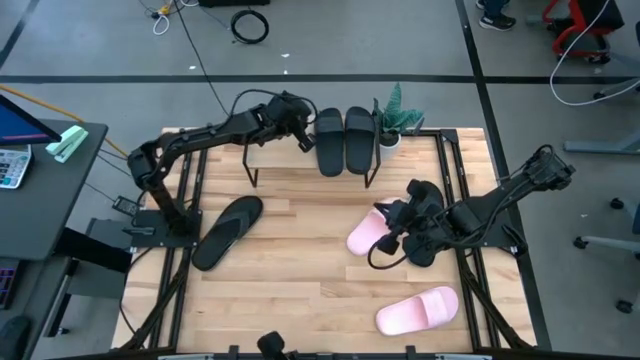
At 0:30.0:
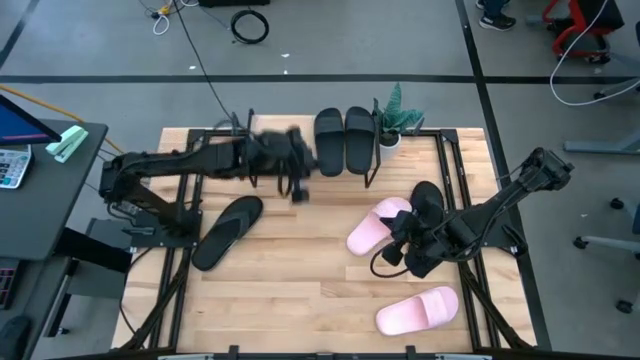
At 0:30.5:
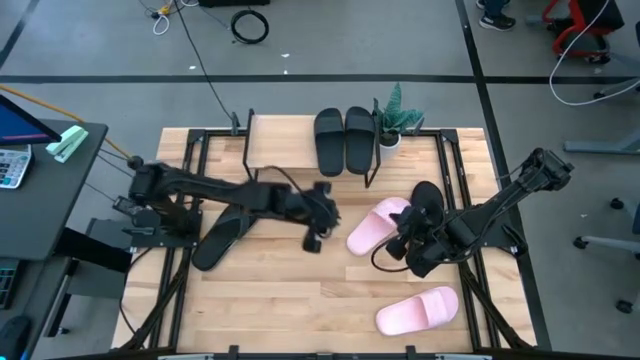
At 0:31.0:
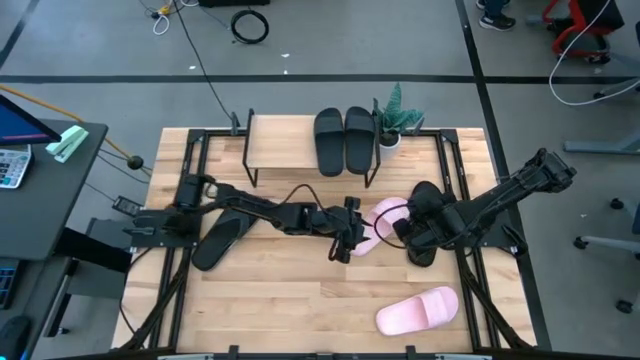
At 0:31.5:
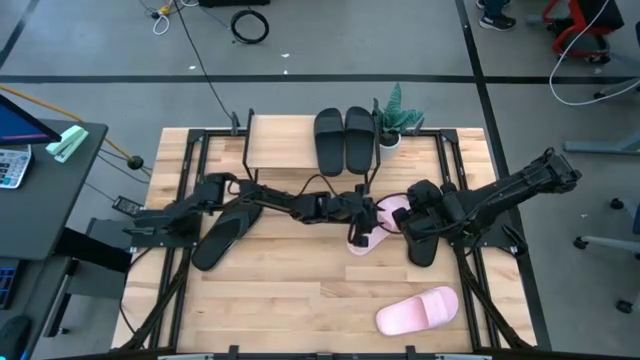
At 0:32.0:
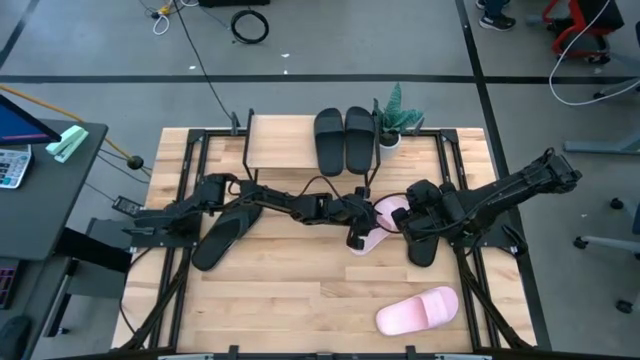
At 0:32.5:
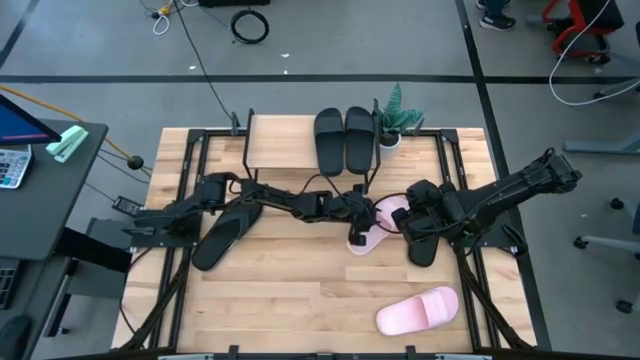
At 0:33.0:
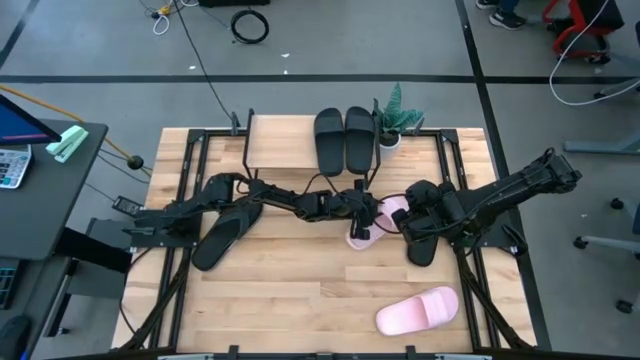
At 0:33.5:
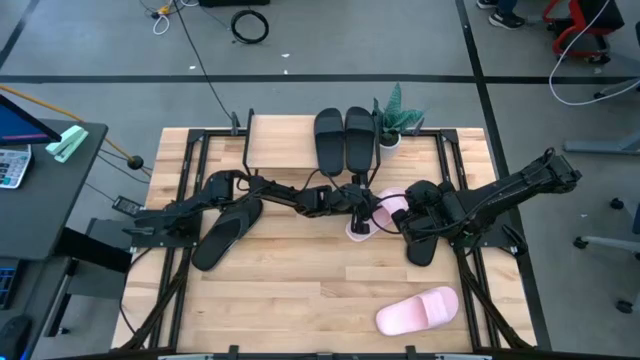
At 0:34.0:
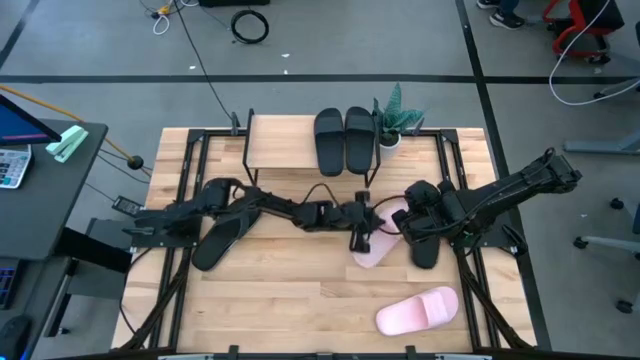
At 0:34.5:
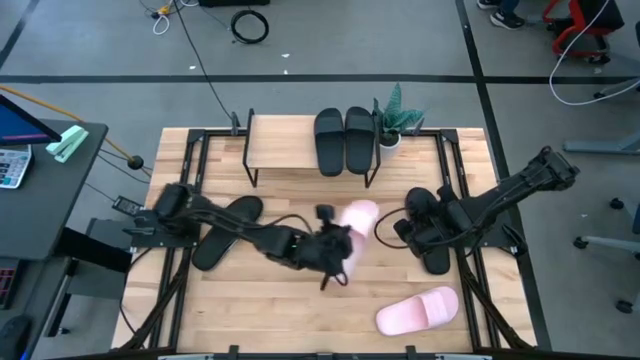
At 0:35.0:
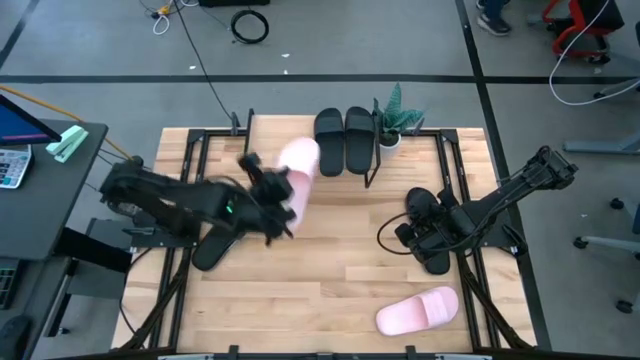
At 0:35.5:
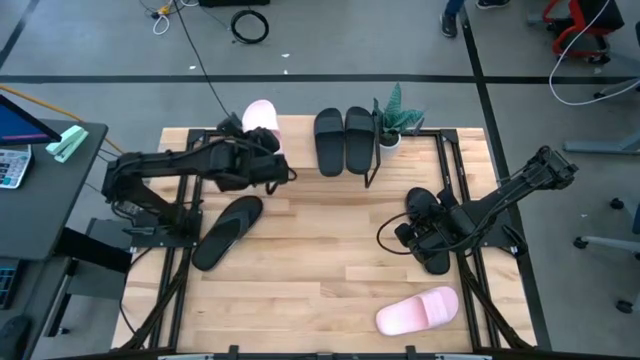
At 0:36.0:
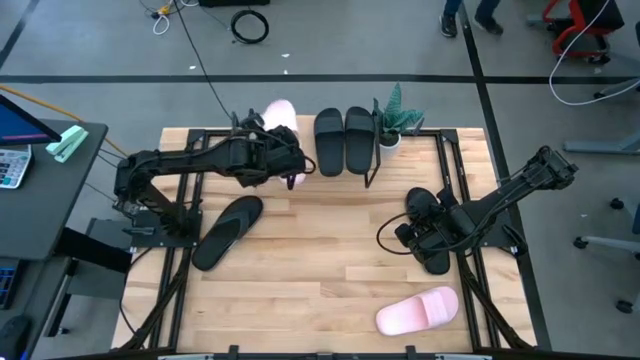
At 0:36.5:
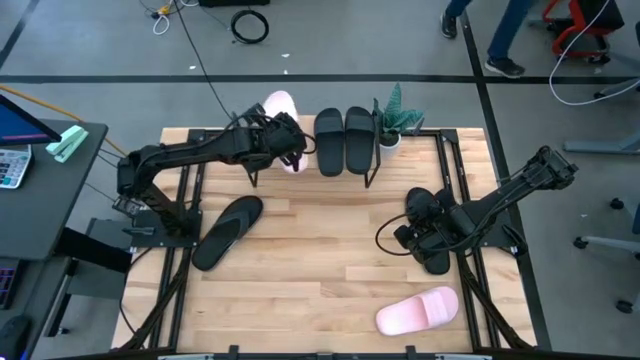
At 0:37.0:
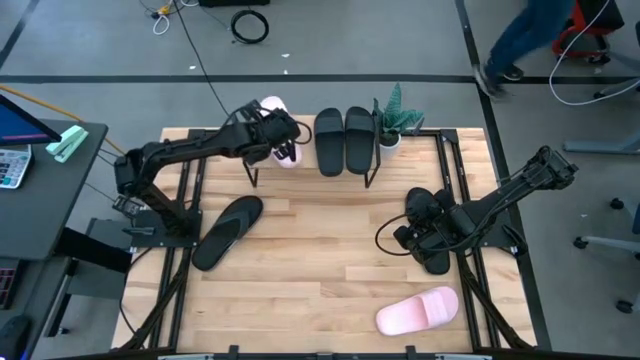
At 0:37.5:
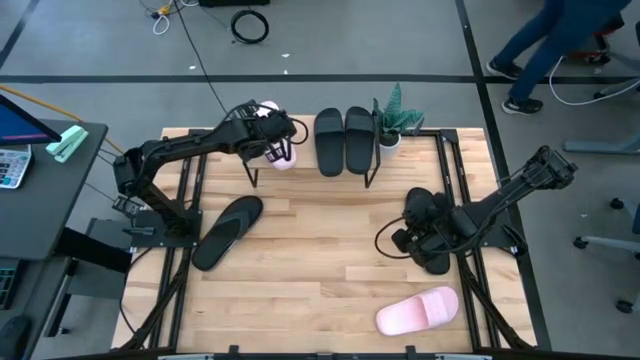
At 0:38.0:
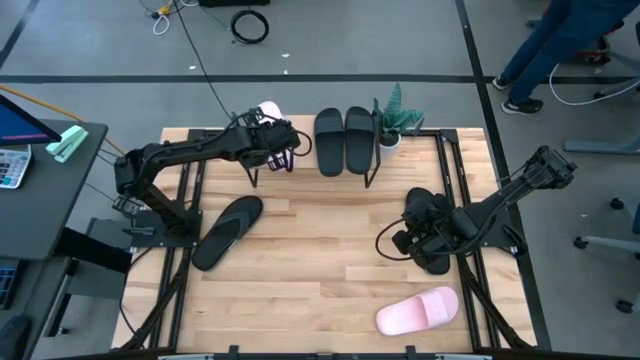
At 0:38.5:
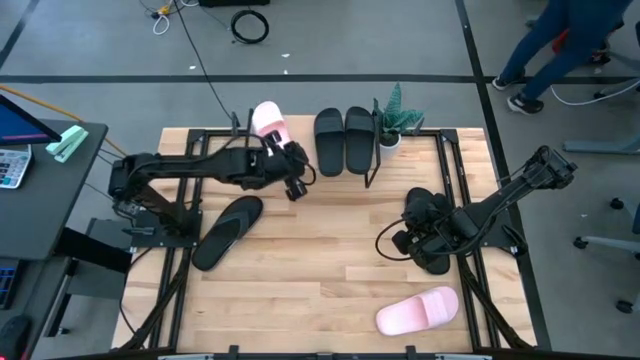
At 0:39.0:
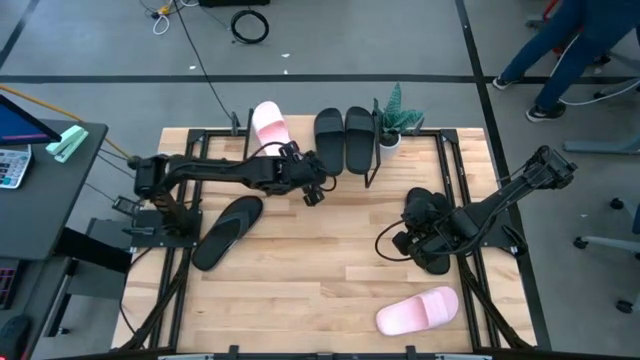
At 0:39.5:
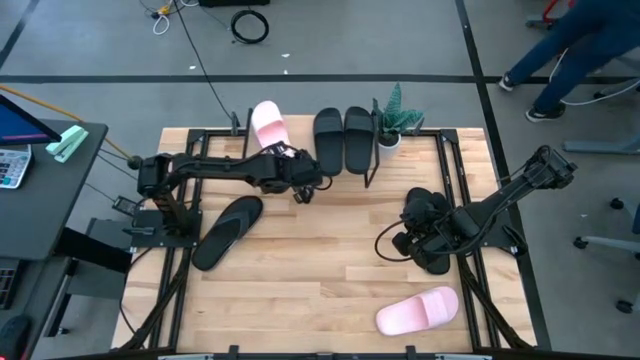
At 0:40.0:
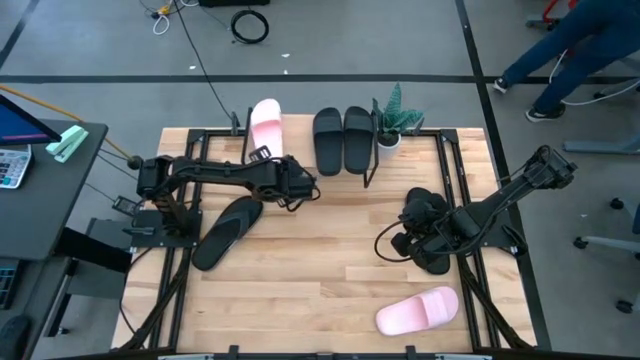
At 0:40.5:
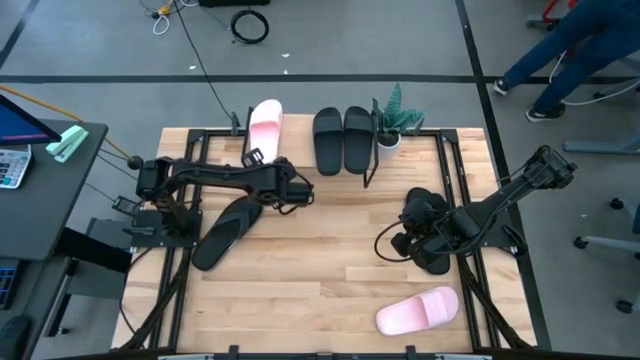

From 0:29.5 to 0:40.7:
Task: Pick and place slides into the shelf
Put the top pink slide on the shelf

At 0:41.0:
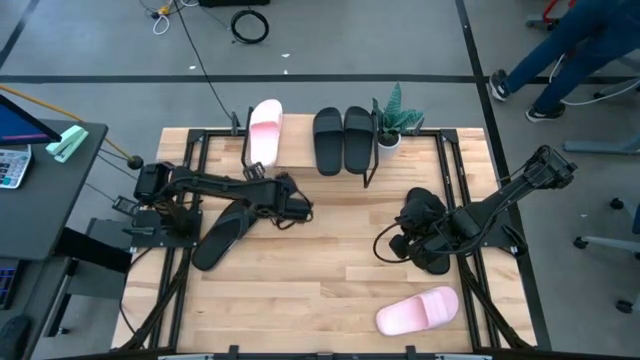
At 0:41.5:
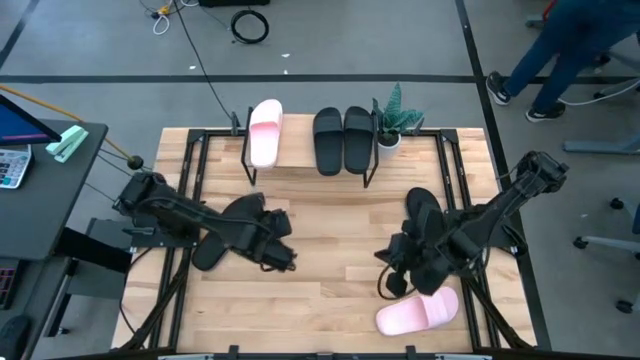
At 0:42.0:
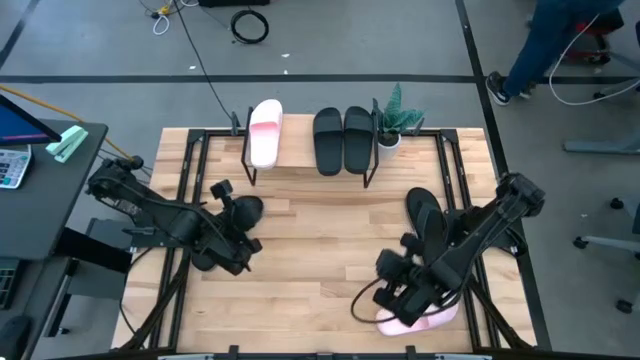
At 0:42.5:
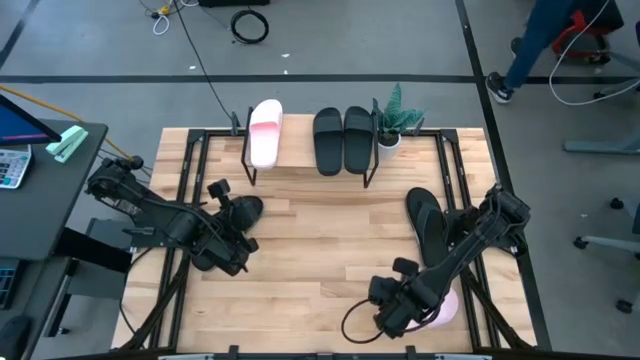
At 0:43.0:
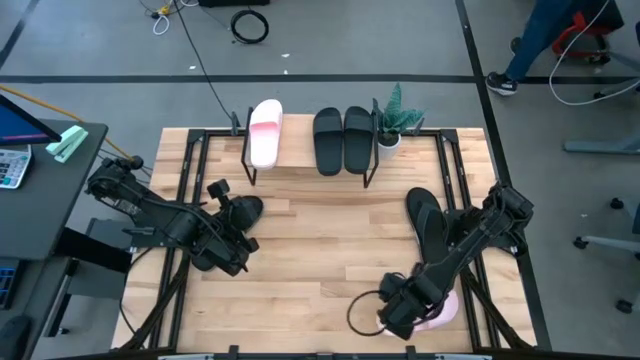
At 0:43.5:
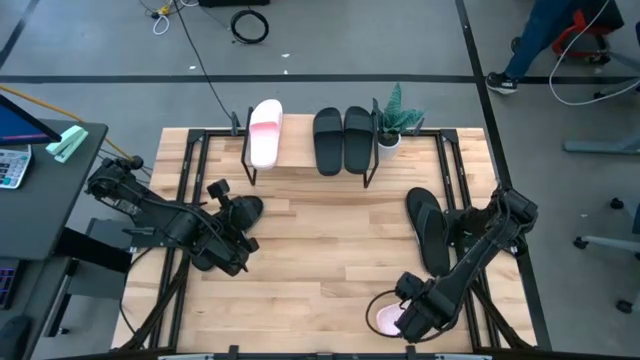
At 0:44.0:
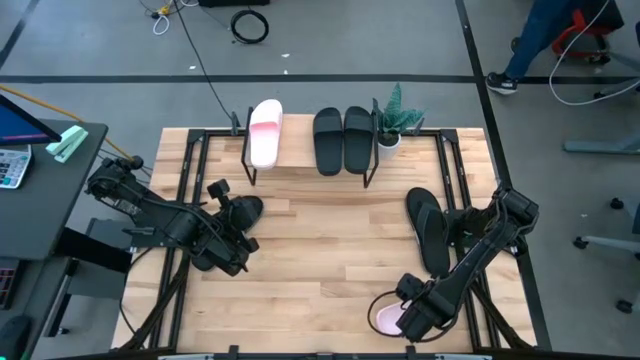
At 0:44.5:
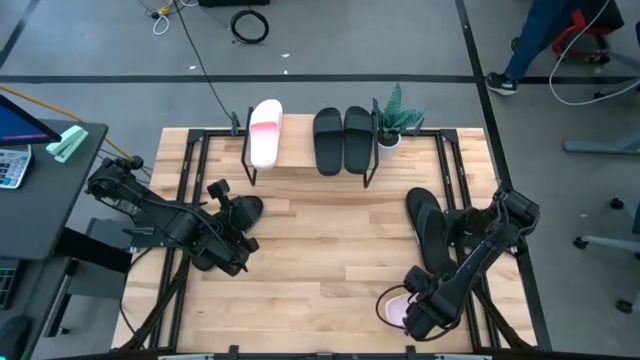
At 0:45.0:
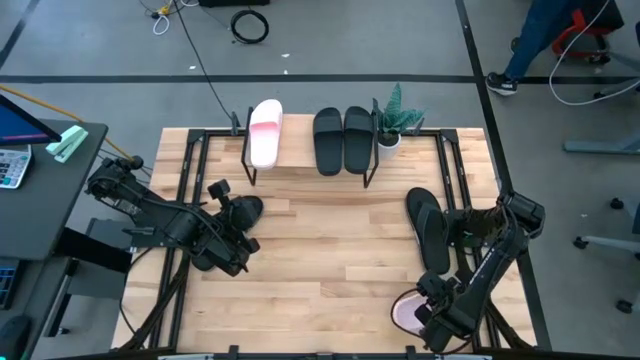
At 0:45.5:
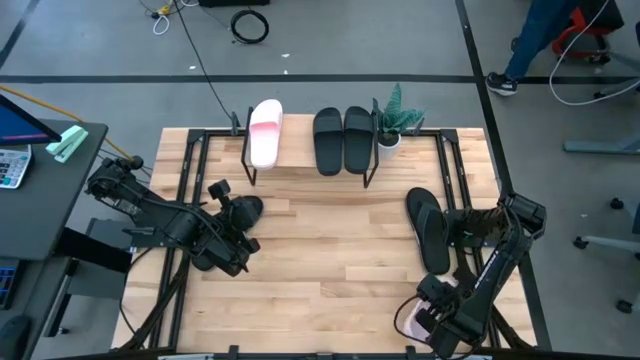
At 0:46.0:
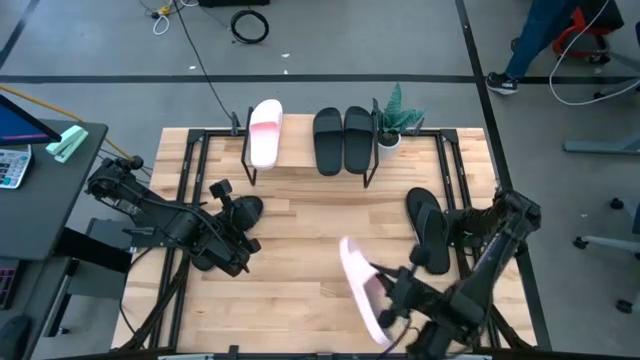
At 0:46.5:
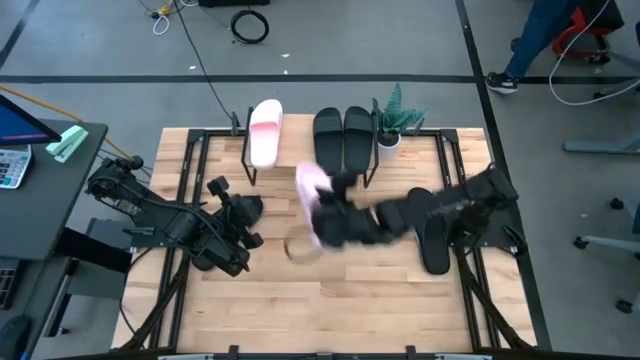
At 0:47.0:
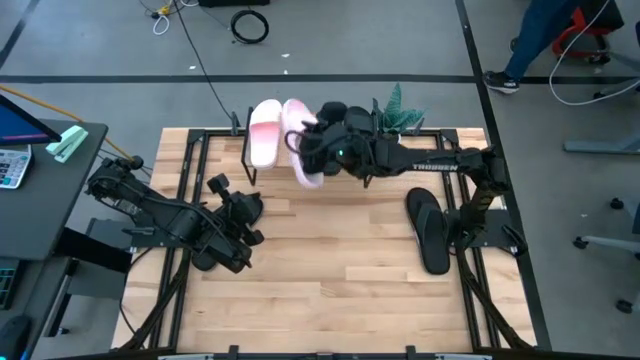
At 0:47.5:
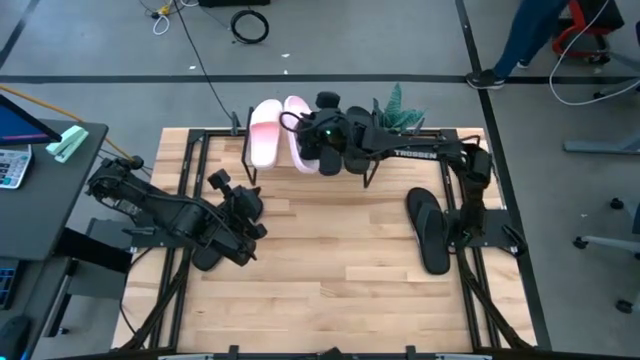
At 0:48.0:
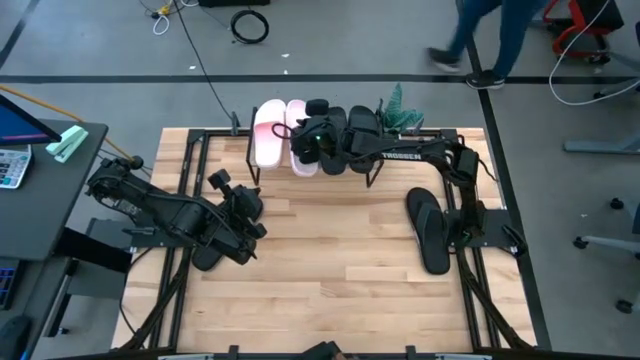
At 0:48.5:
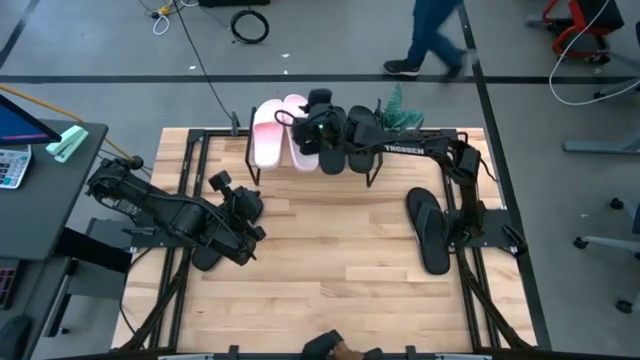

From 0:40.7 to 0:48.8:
Put the pink slide on the shelf

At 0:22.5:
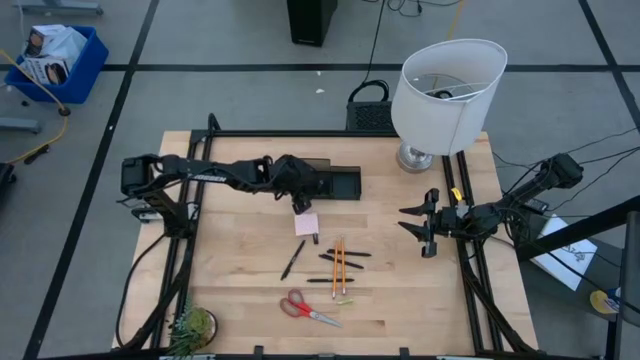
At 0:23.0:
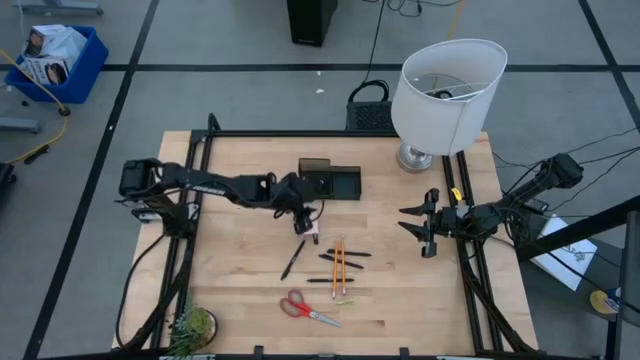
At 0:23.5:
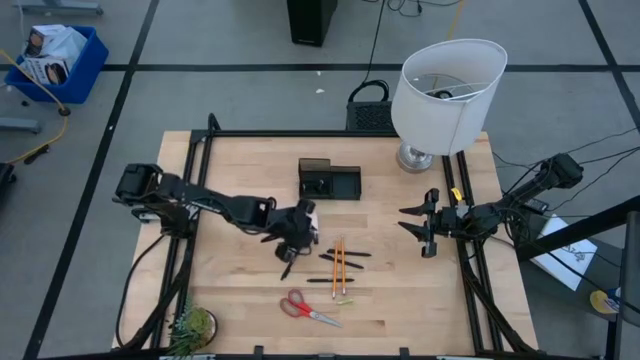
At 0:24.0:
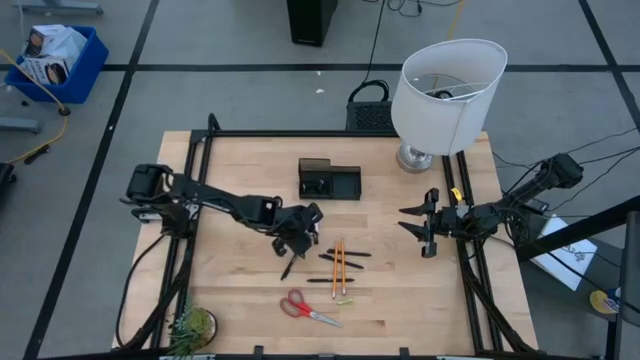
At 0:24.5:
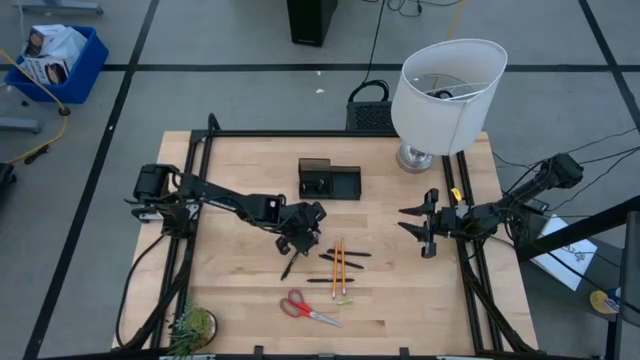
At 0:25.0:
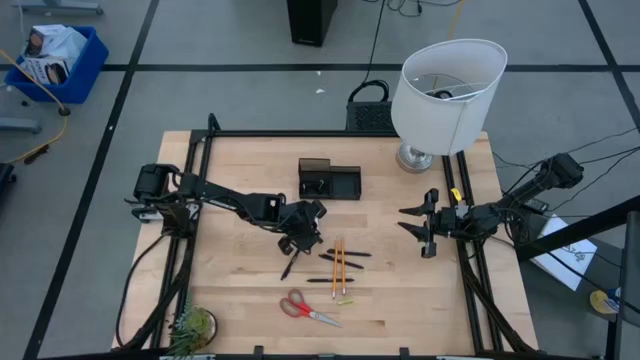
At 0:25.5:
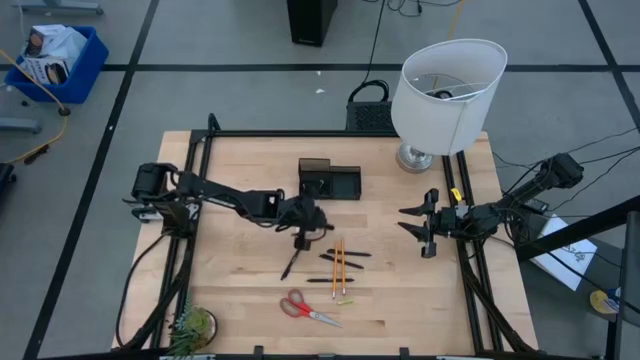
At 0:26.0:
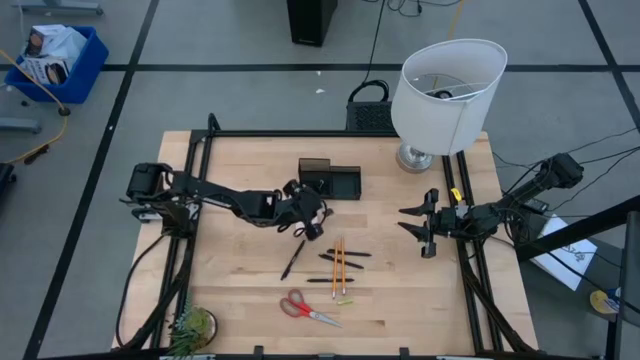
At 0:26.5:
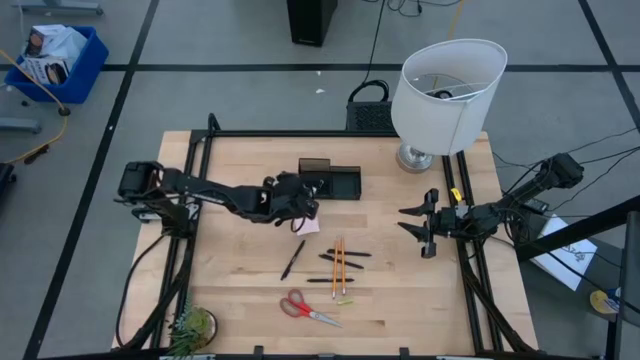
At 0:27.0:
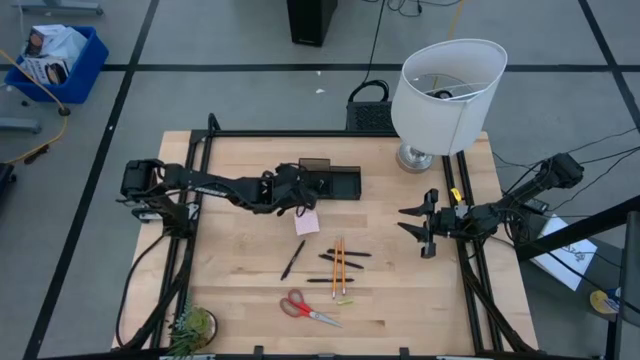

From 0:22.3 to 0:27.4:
Task: Pick and place office supplies into organizer
Put the black binder clip into the desk organizer
